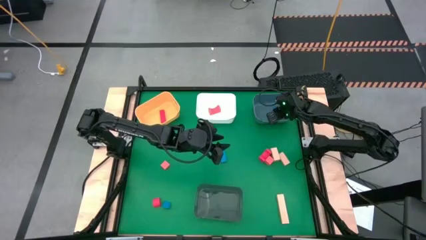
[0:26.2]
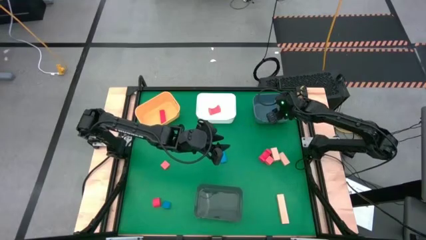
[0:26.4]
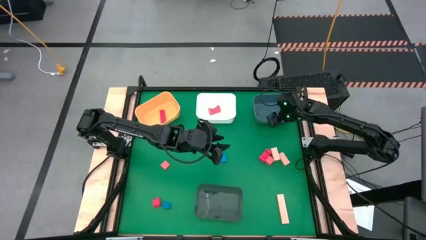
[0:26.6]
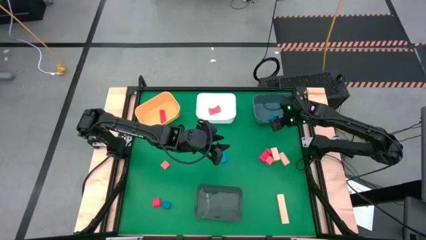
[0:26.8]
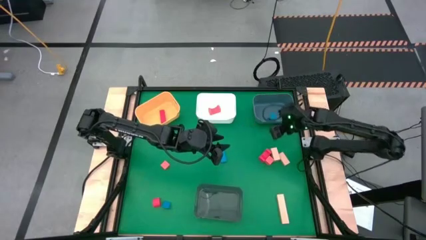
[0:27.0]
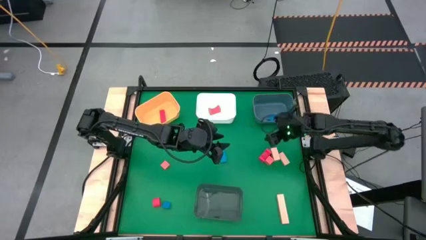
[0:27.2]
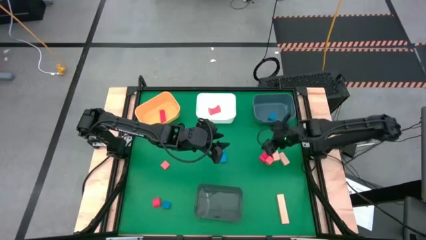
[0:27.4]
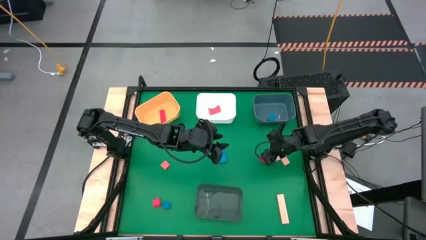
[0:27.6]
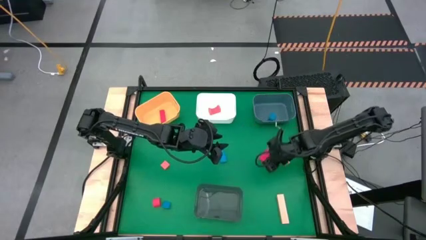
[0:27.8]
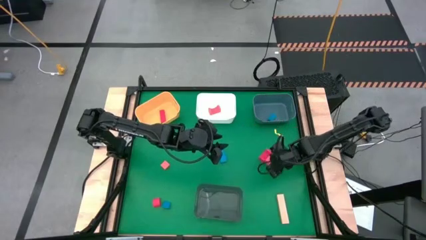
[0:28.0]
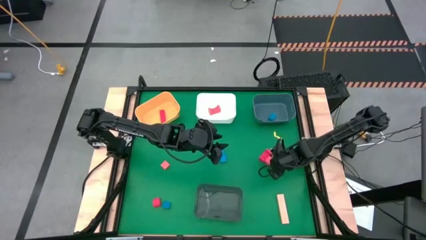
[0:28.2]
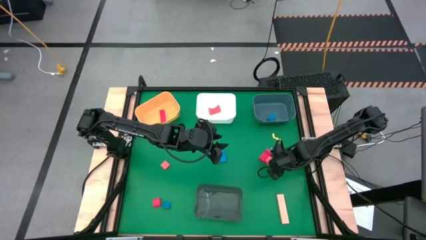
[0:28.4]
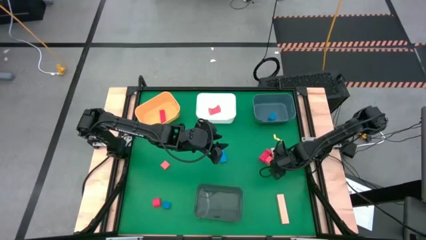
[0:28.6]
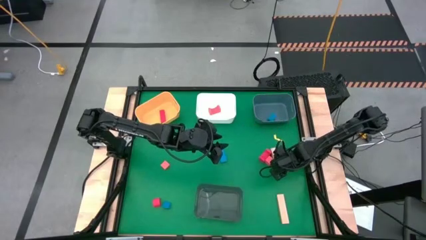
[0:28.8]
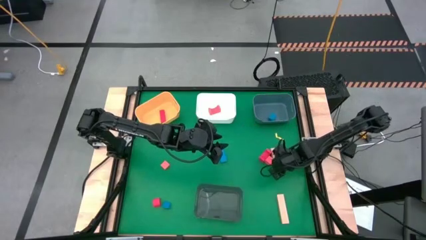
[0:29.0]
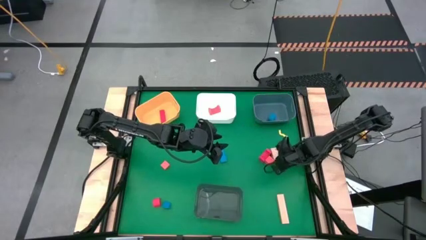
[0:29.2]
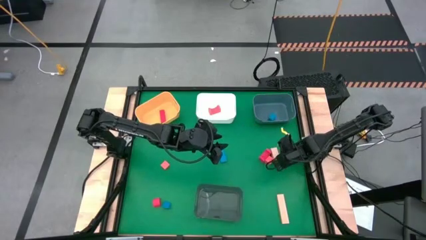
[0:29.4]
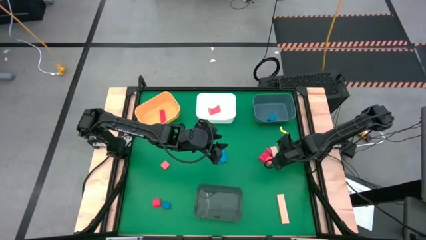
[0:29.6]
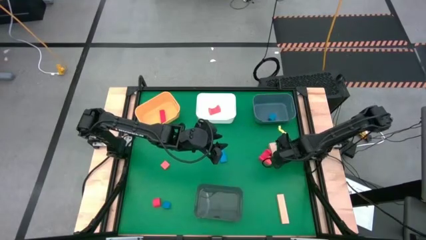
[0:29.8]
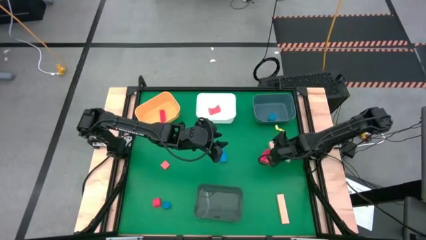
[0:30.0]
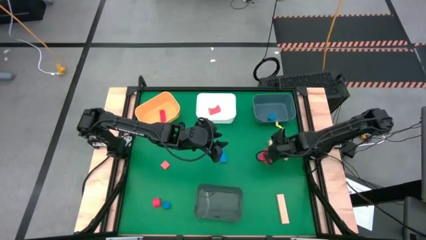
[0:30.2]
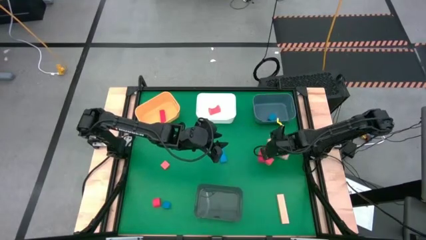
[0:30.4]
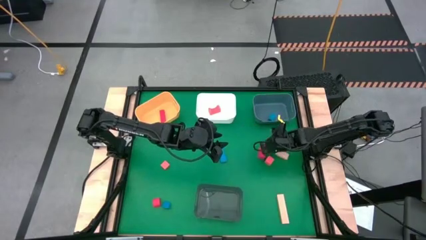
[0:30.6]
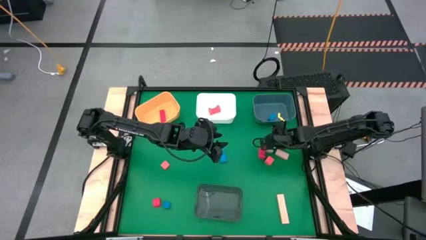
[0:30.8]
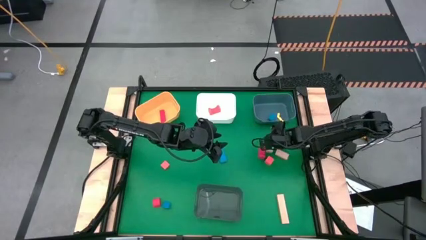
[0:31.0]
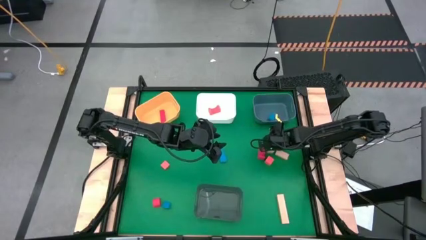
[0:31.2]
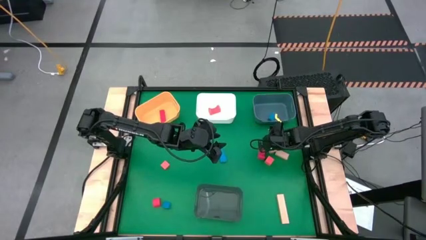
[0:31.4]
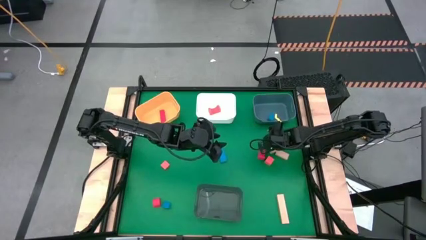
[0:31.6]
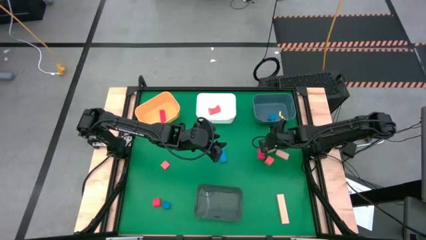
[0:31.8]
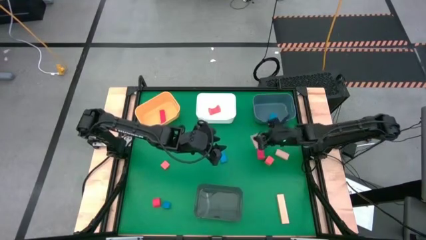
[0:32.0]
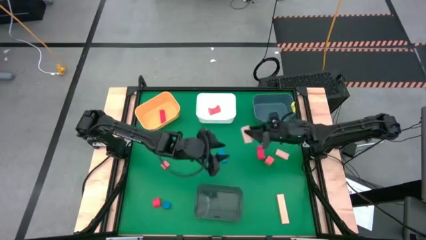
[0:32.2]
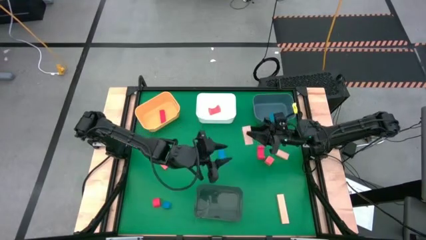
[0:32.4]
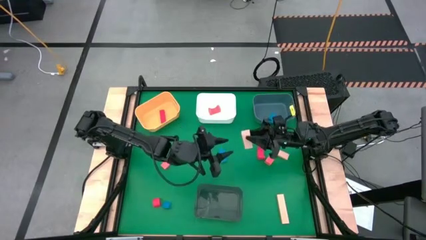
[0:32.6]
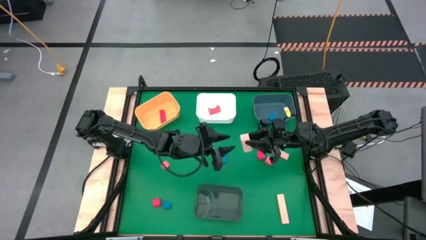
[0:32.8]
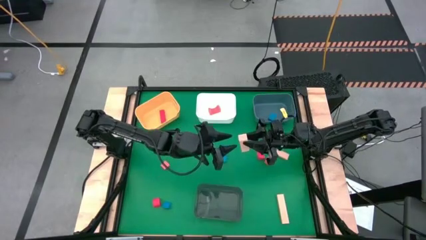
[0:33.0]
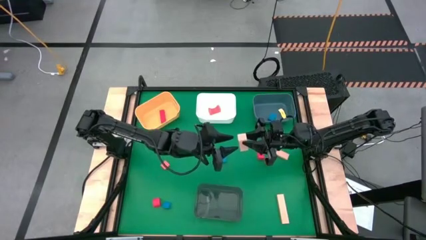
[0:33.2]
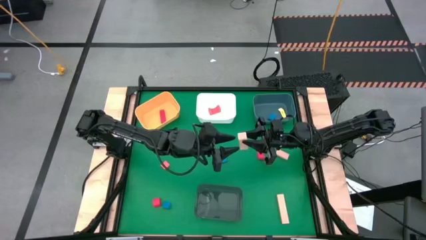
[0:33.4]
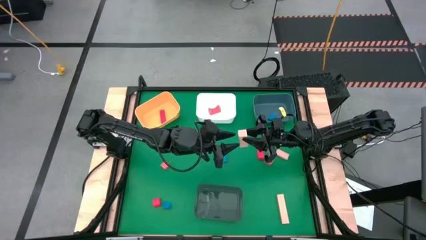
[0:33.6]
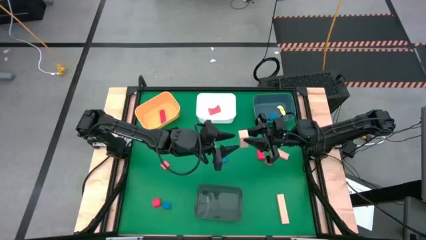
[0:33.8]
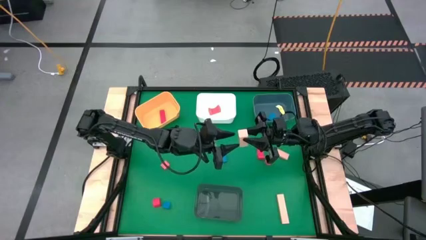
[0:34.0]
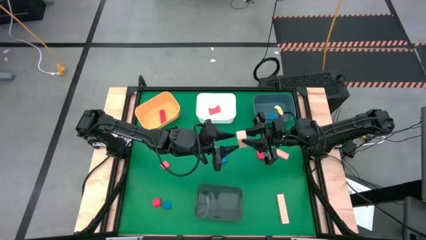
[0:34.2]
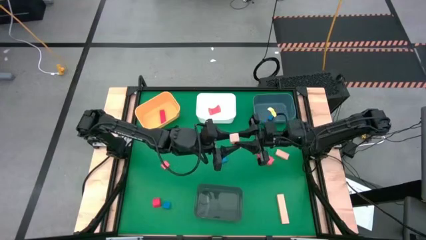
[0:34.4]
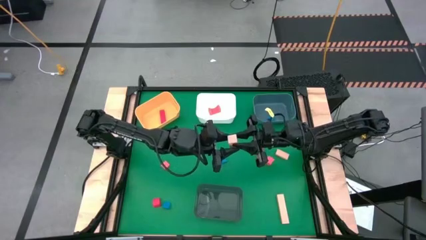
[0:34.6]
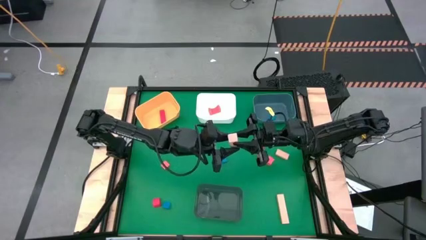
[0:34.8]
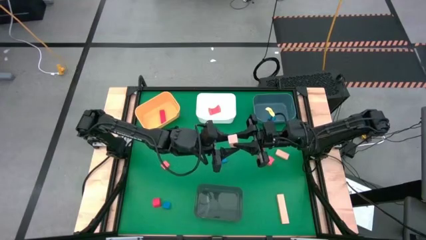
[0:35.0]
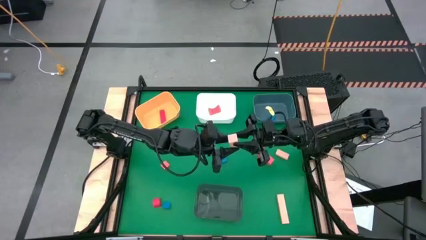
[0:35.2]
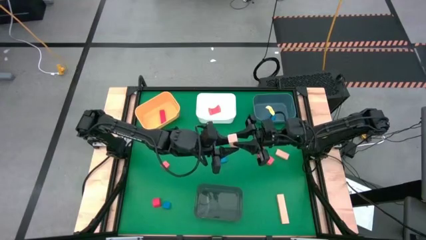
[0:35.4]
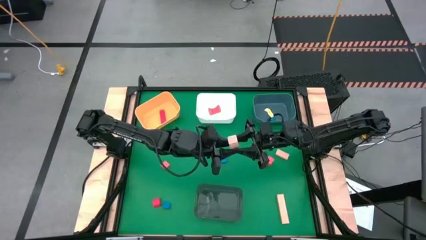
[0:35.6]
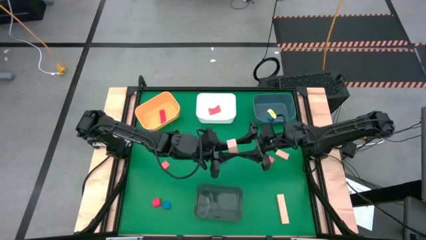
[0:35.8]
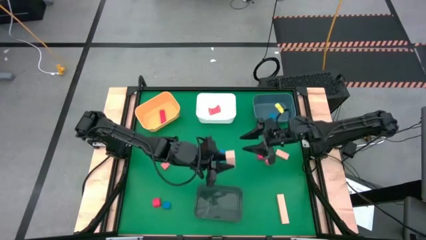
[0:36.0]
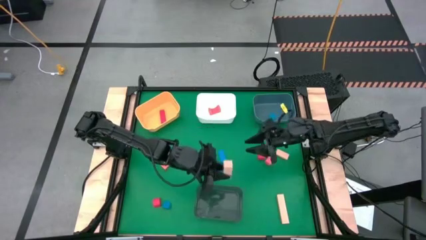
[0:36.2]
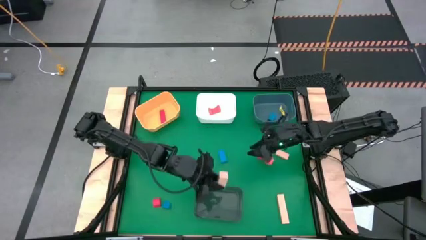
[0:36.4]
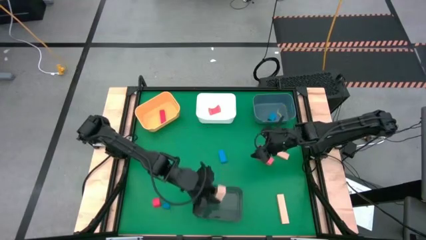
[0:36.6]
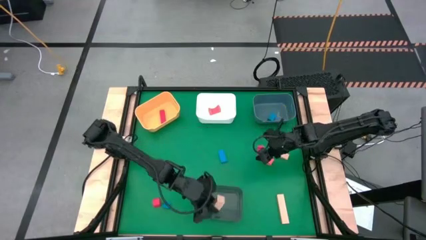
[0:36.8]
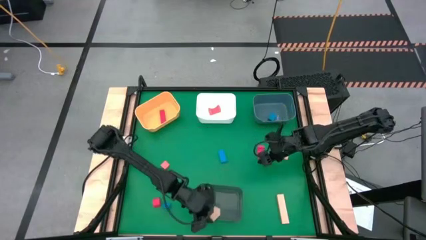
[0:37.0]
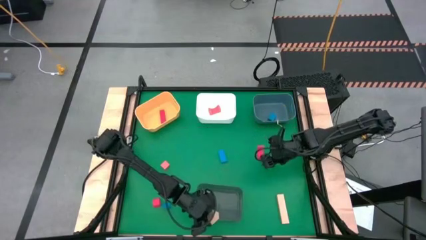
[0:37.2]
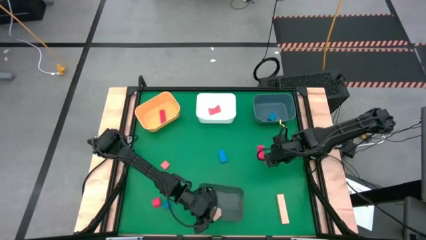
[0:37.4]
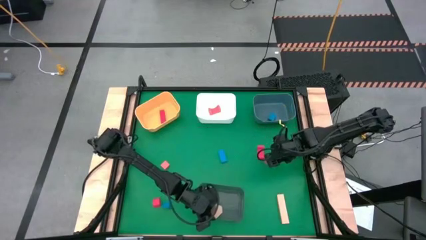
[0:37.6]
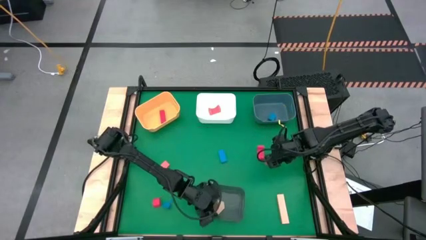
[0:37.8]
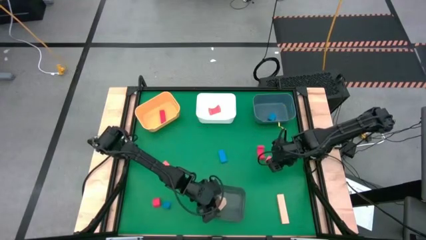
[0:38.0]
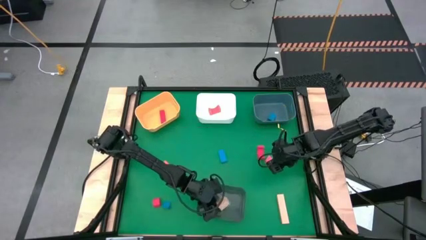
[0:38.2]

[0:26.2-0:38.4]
Task: Sort & place blocks by color
Put the light orange block into the black bin
